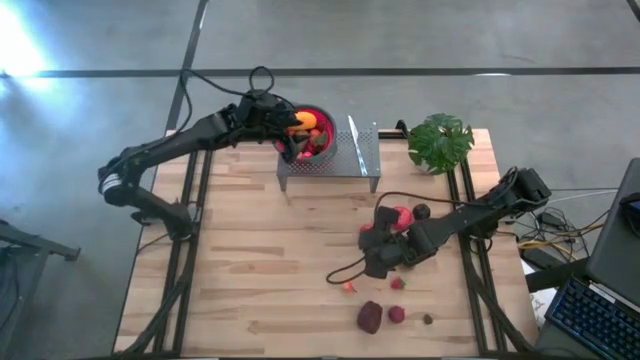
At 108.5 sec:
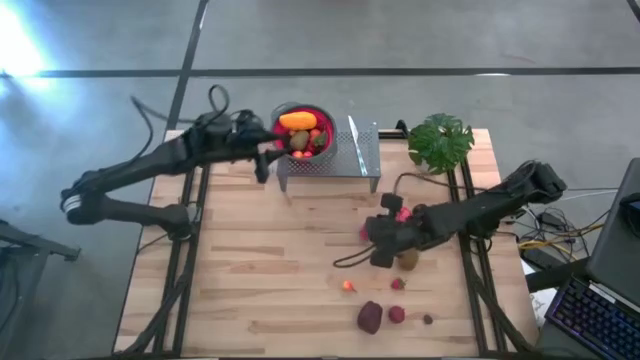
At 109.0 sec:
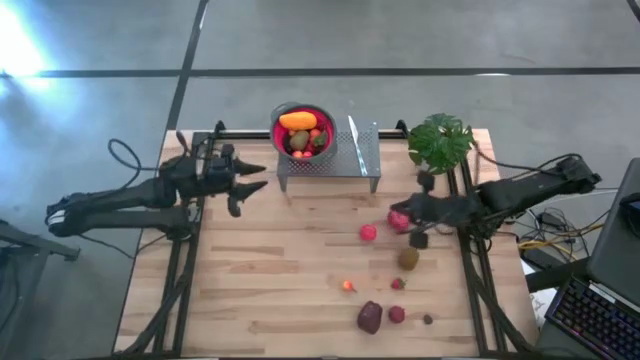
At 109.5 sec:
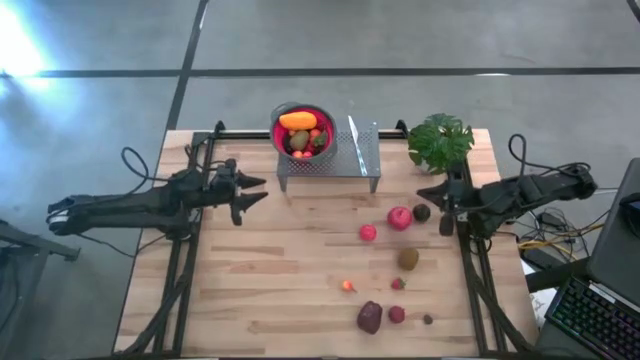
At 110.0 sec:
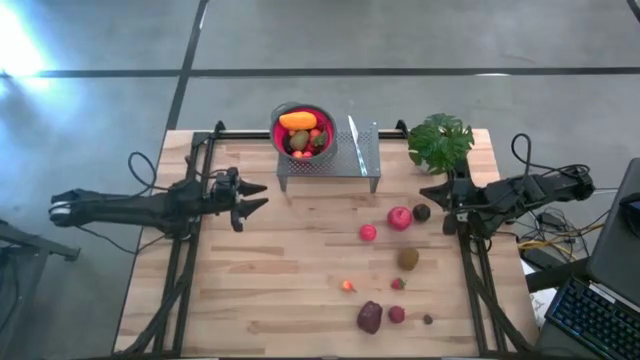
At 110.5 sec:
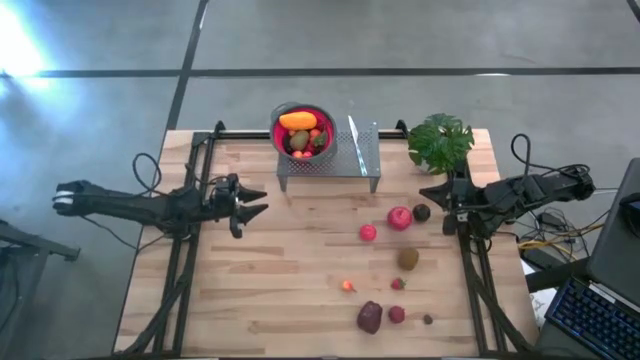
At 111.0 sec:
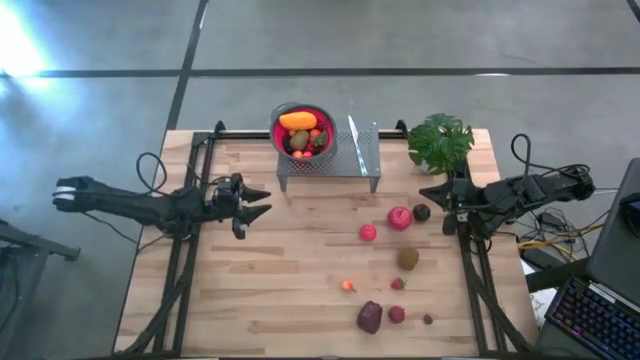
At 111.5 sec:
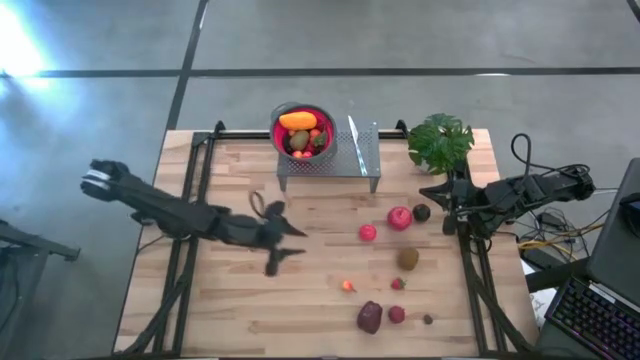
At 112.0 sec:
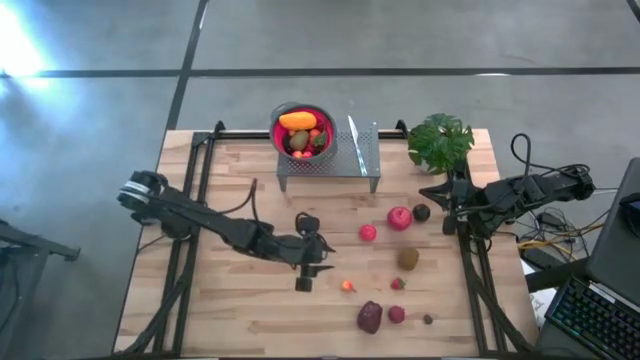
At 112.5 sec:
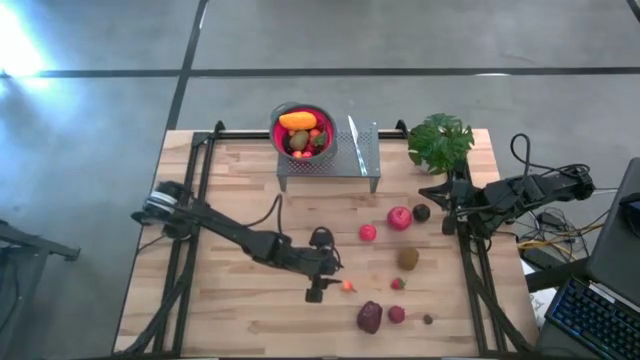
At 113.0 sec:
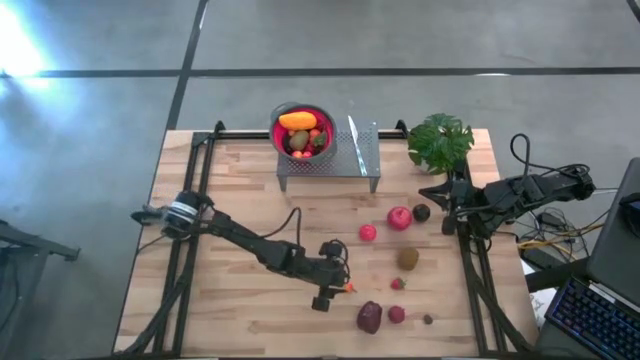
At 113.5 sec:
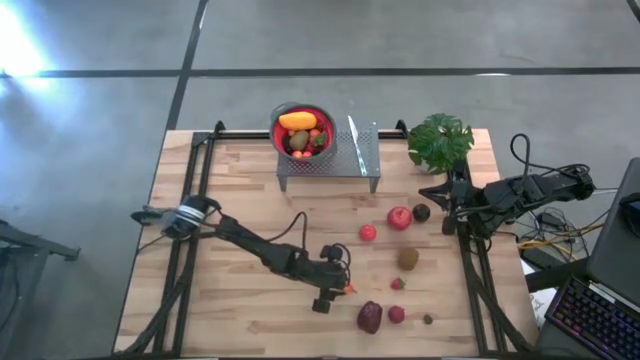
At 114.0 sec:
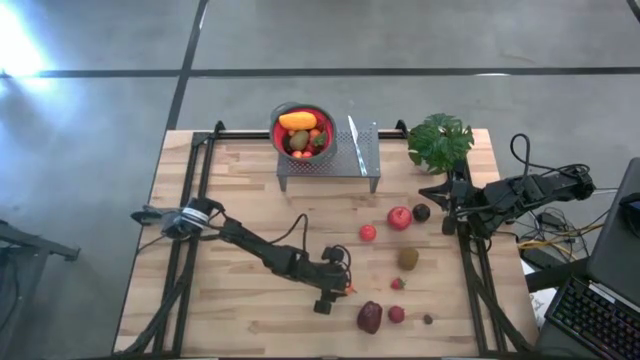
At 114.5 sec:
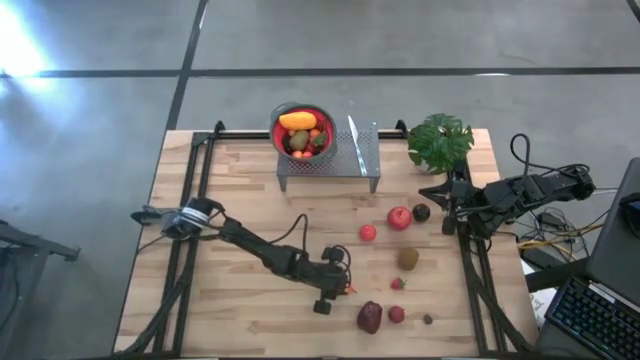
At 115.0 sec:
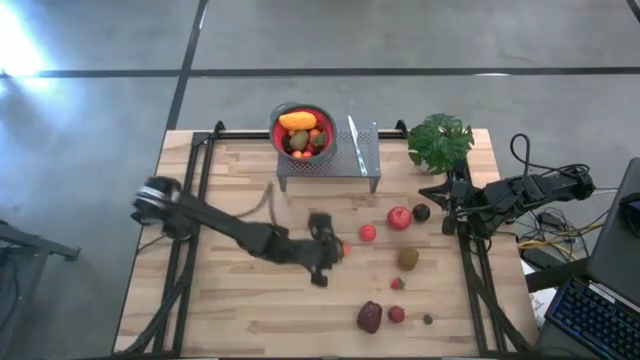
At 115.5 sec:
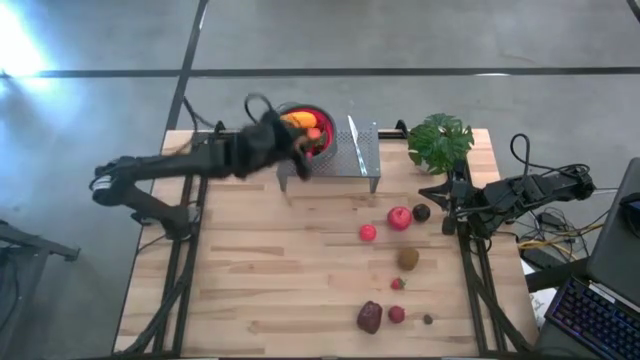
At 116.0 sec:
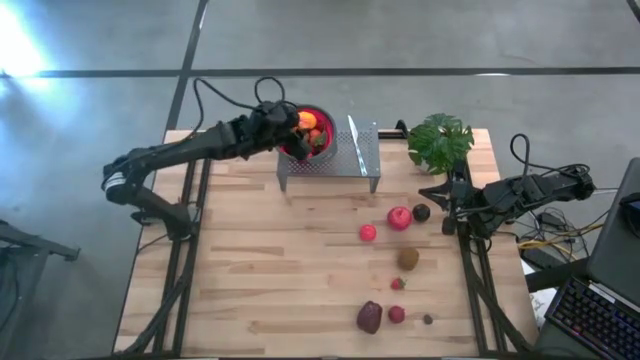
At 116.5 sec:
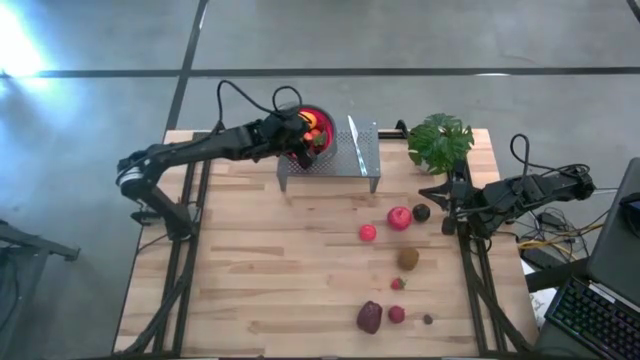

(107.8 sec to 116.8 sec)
Task: Pick & Place Fruit
Put the yellow pear into the red strainer bowl on the shelf

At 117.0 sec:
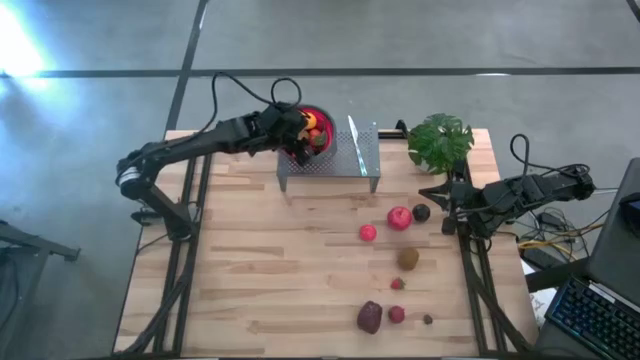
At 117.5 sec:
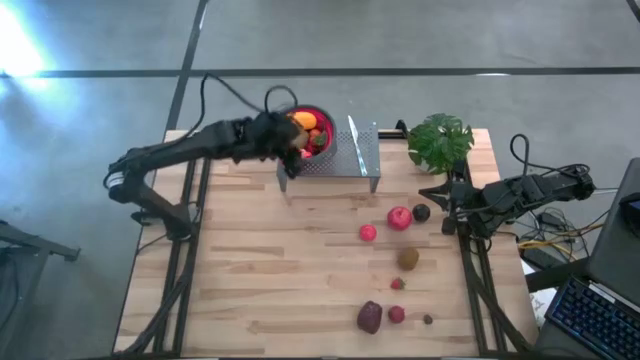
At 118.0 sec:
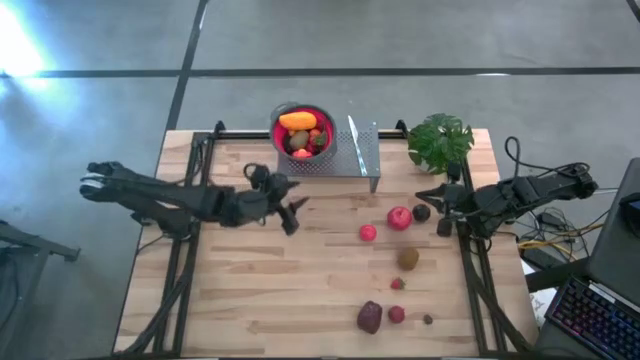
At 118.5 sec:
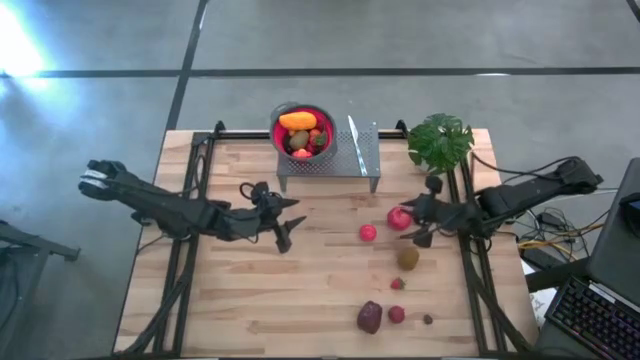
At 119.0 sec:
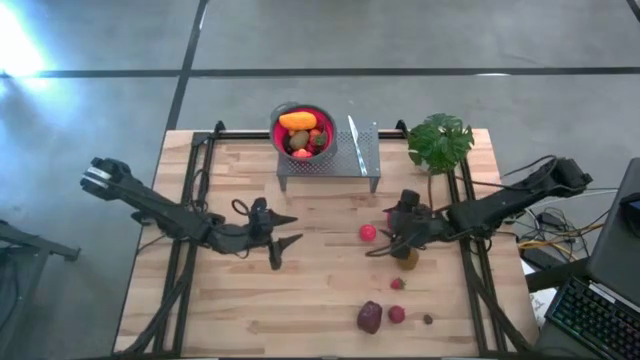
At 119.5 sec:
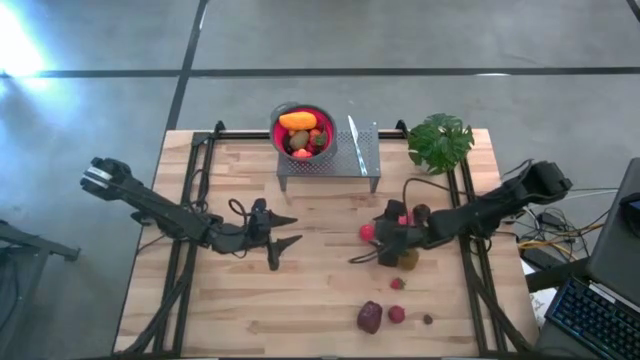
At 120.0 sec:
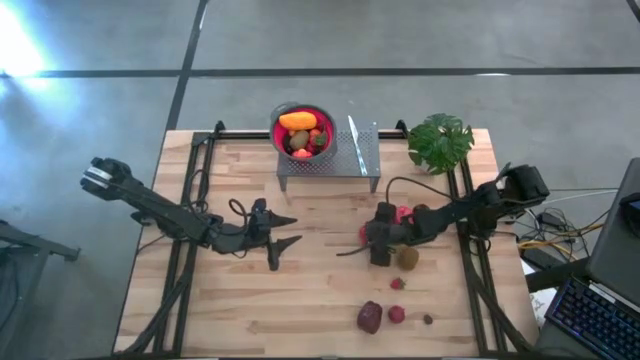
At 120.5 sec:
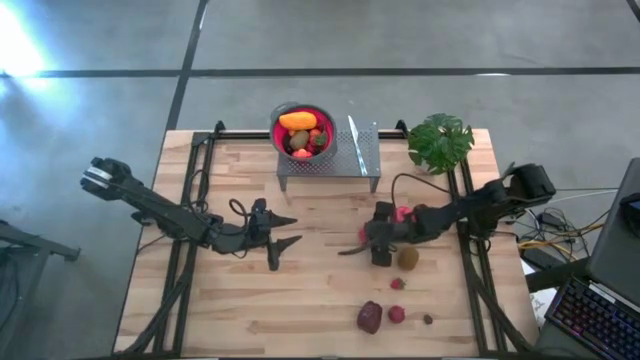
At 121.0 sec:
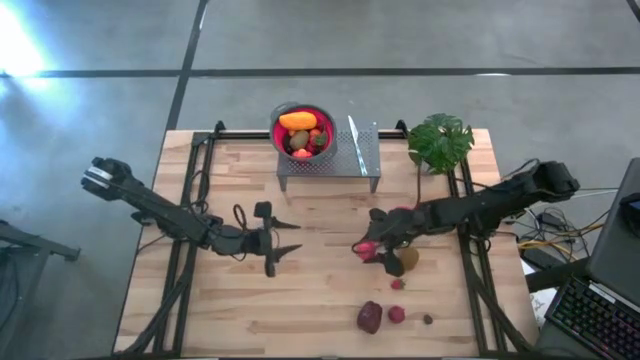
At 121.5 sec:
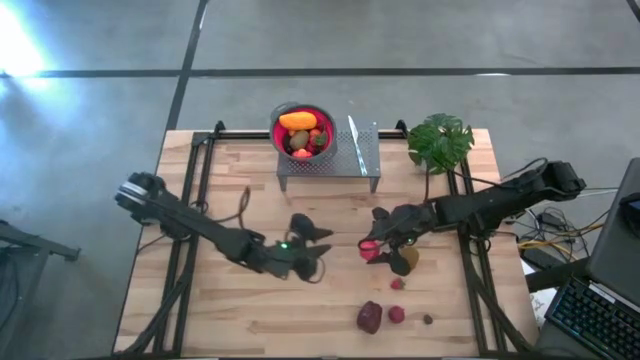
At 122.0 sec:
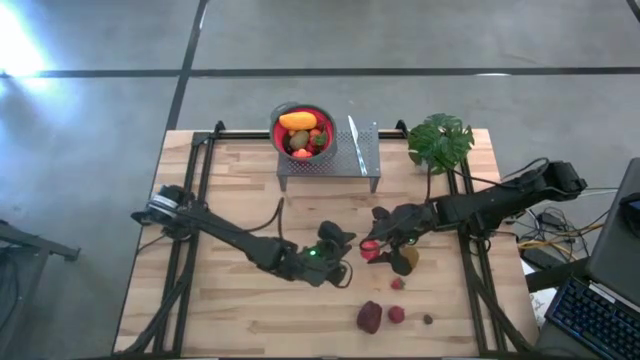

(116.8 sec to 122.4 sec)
Put the tomato into the red strainer bowl on the shelf

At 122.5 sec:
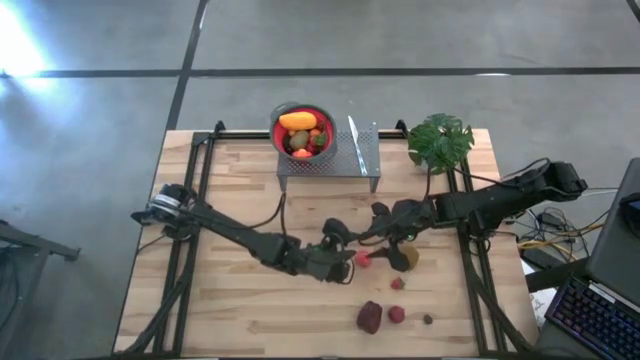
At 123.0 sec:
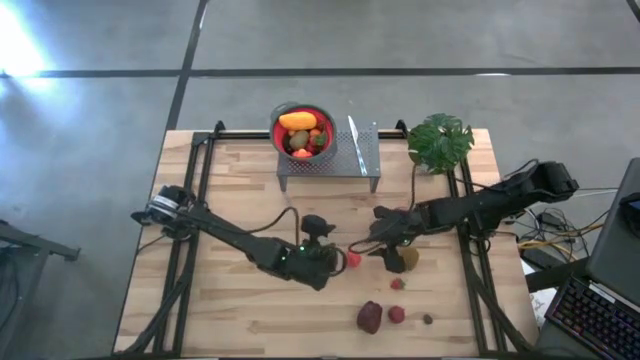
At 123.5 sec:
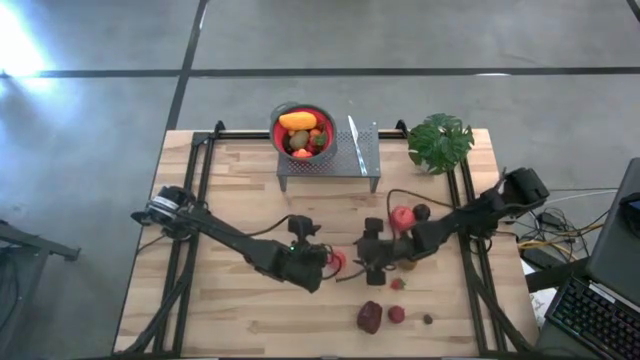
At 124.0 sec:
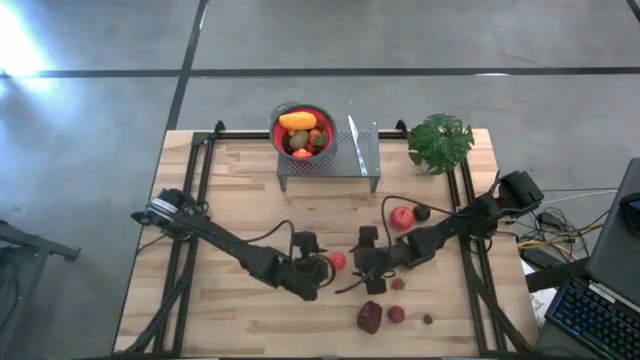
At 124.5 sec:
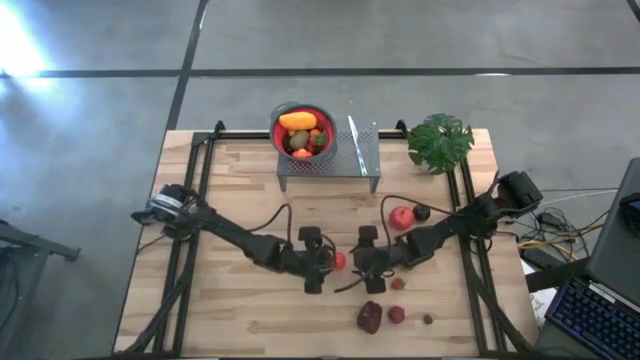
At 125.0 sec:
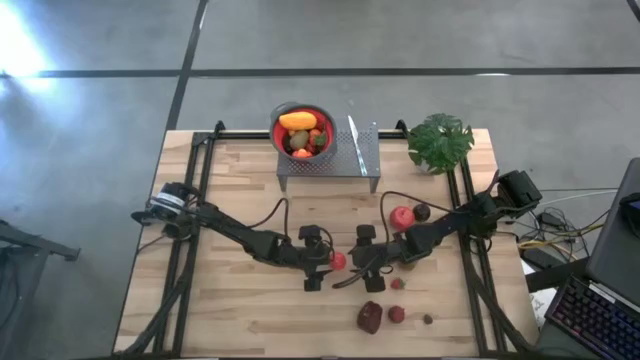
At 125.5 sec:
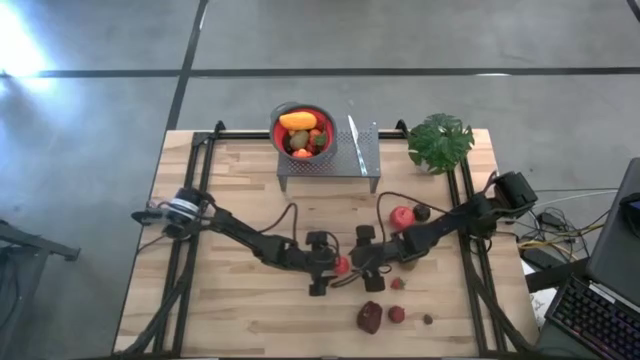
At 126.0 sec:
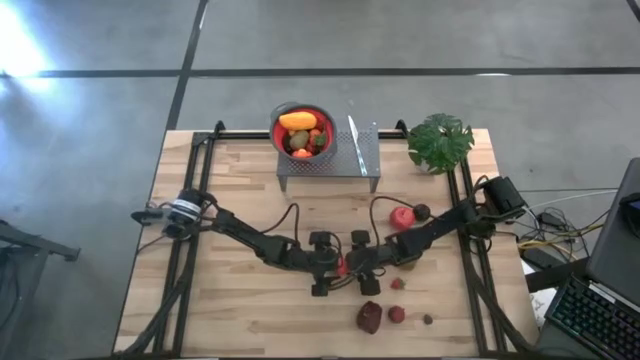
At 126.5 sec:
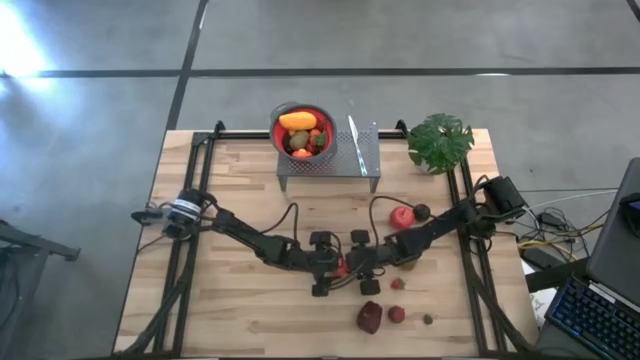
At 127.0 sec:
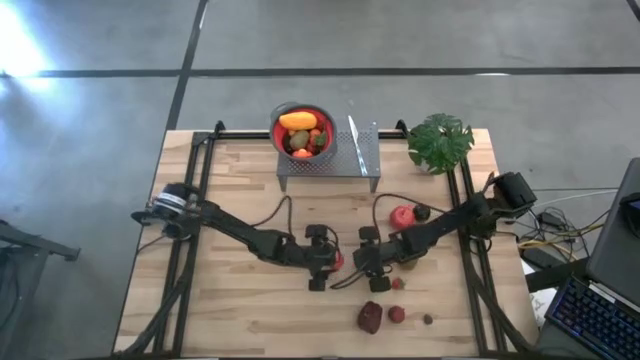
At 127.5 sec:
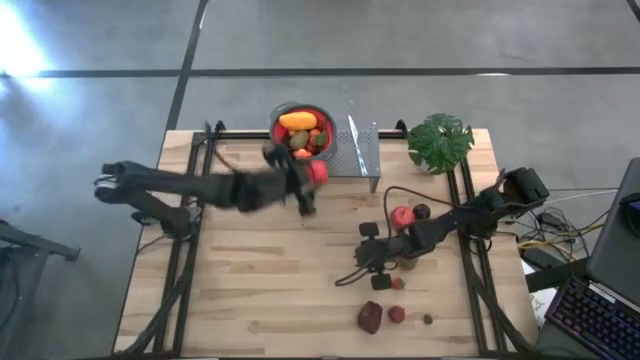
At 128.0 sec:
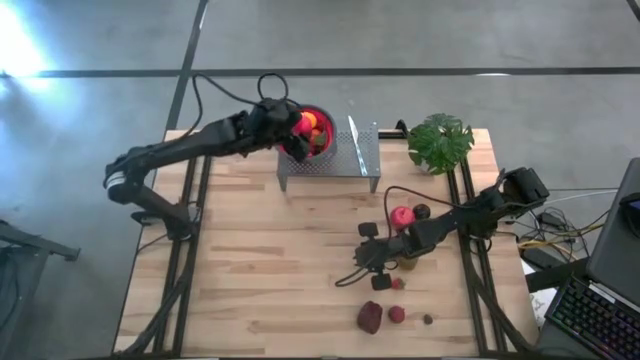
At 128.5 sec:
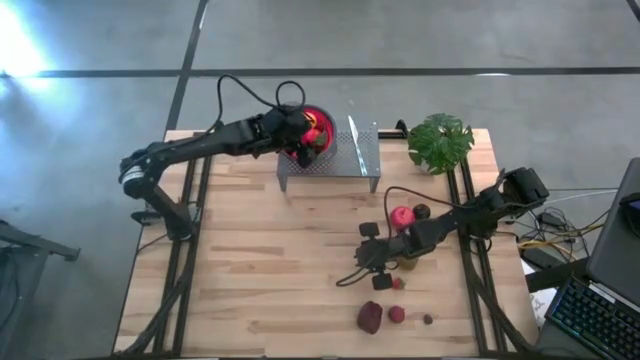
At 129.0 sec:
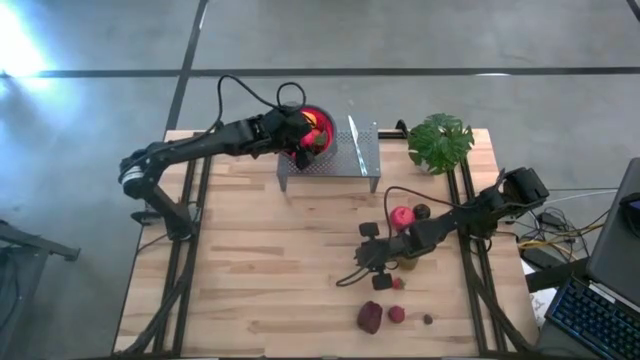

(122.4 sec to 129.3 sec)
Put the tomato into the red strainer bowl on the shelf
